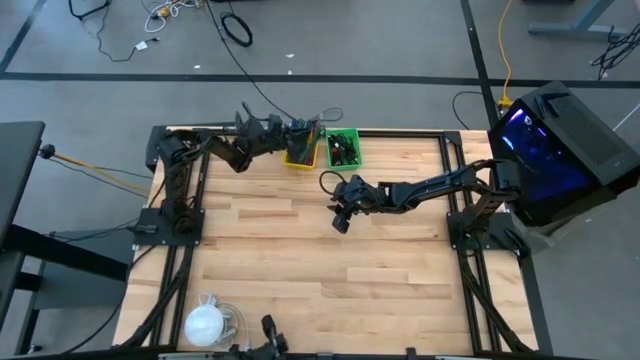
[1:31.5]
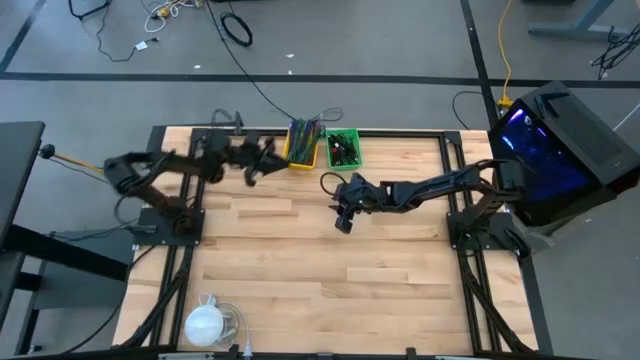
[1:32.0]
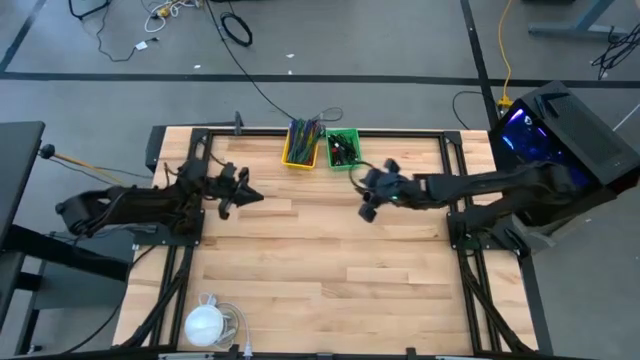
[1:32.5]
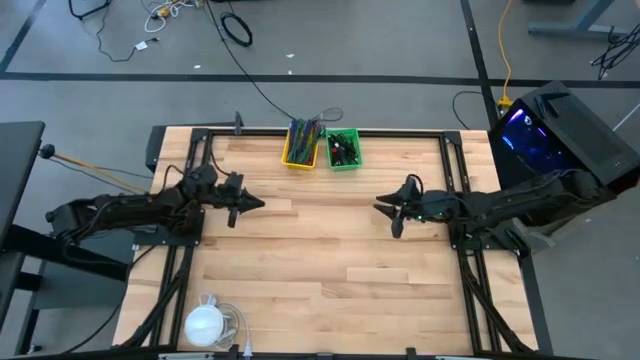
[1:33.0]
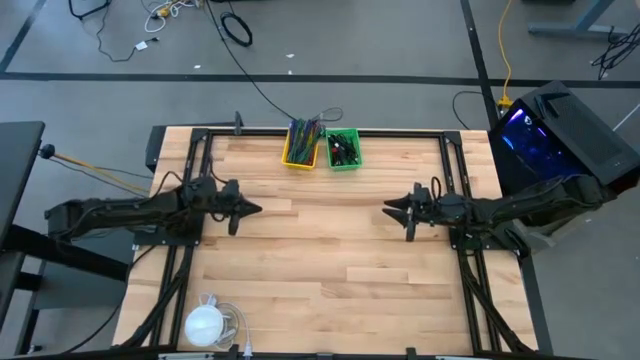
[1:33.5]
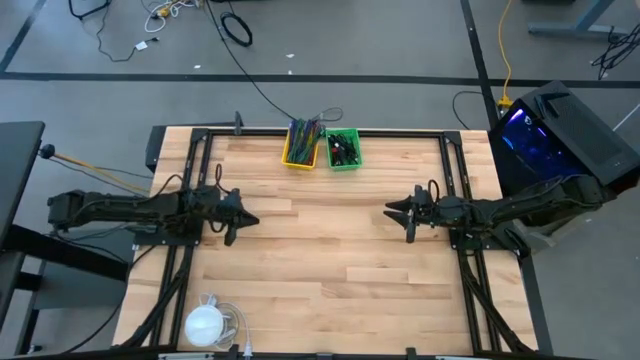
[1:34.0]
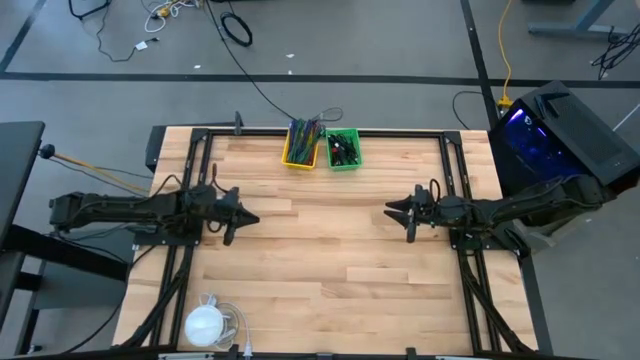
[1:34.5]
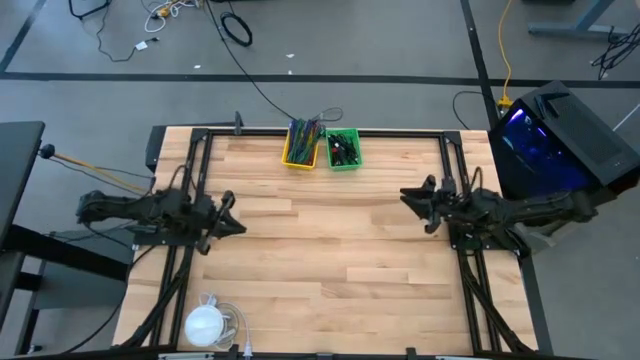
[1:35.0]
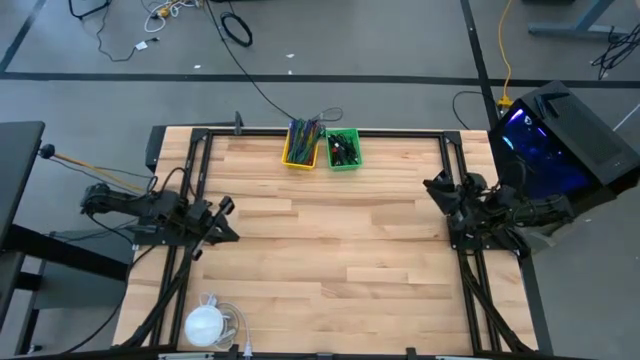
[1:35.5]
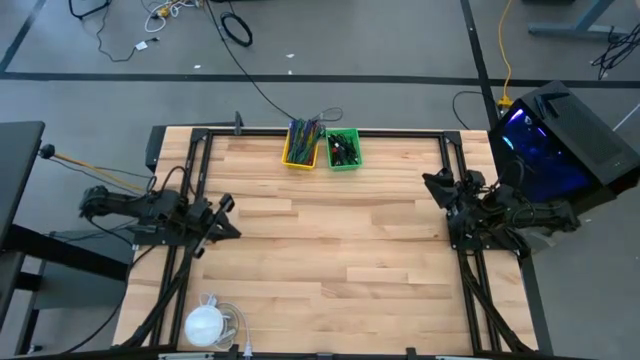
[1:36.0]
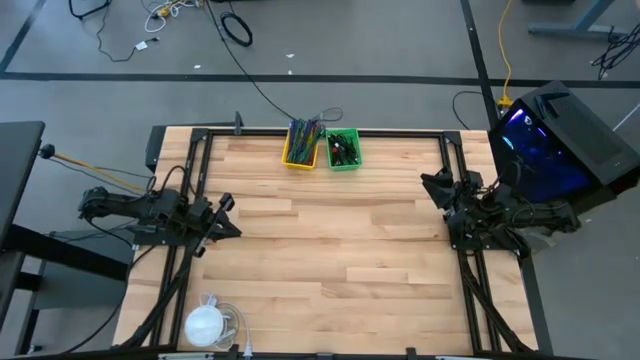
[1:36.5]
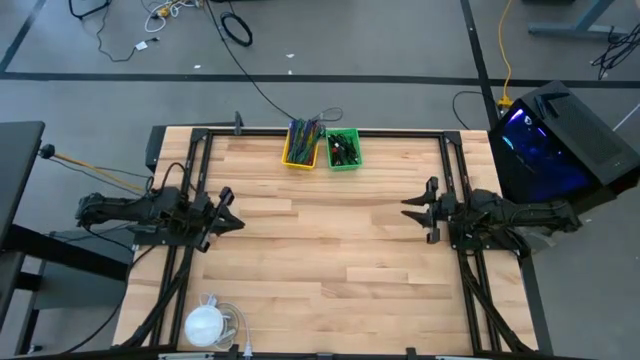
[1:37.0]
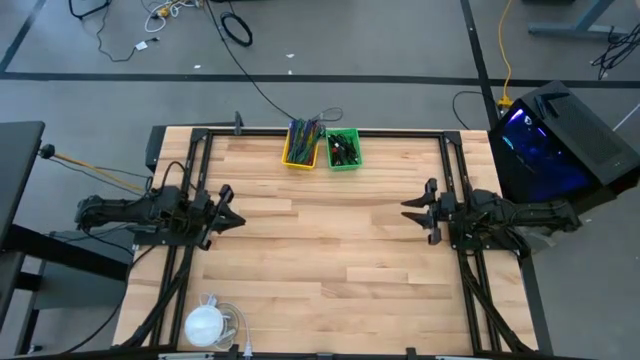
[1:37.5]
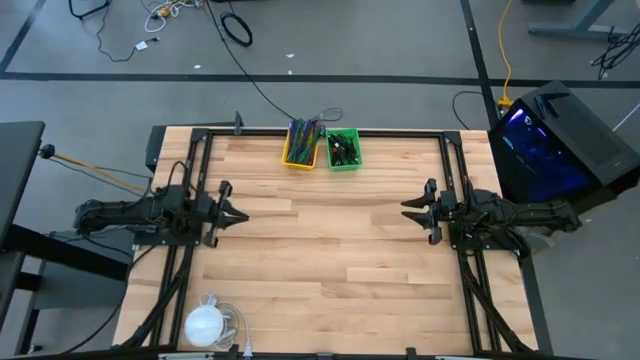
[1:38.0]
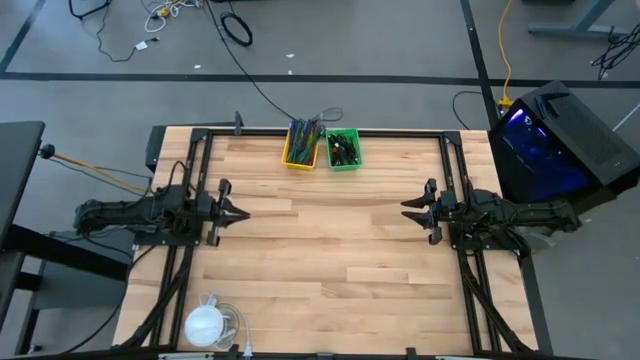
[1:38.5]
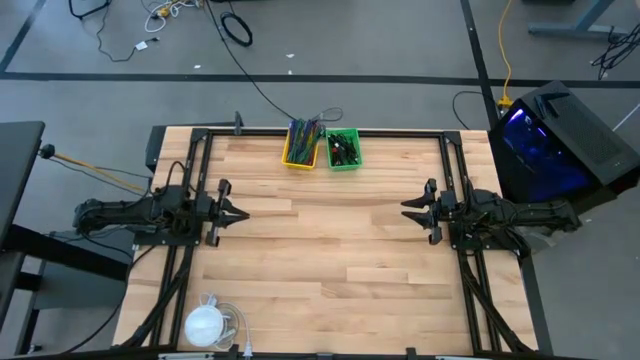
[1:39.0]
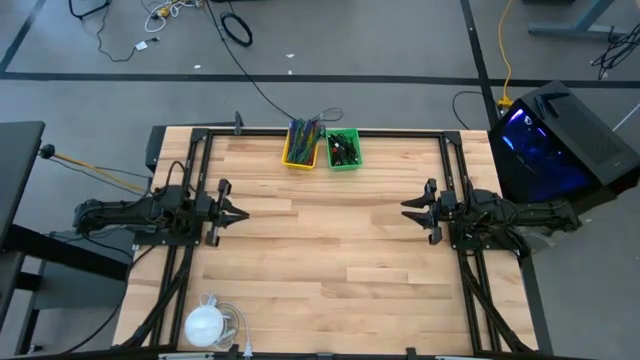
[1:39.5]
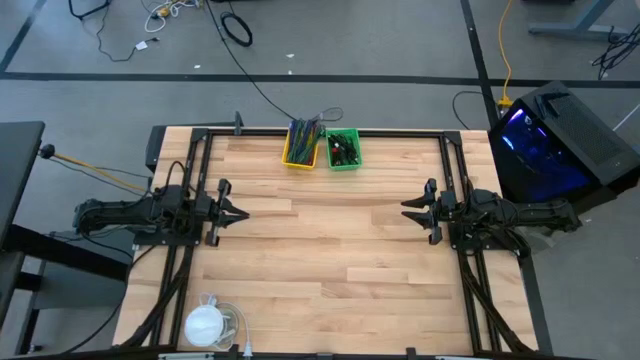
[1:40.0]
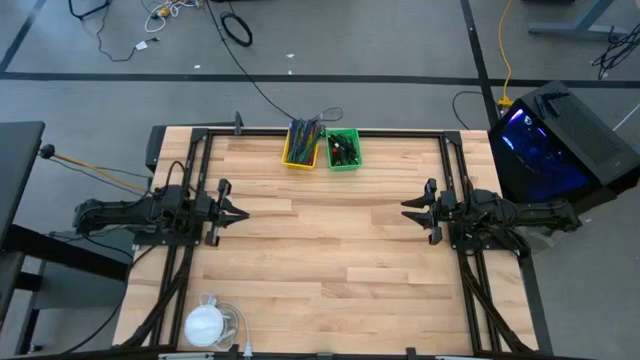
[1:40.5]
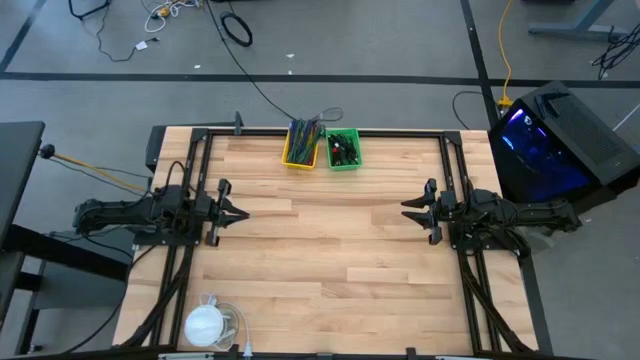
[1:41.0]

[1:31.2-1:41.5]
Task: Pick & Place USB Port
Return to Home Position

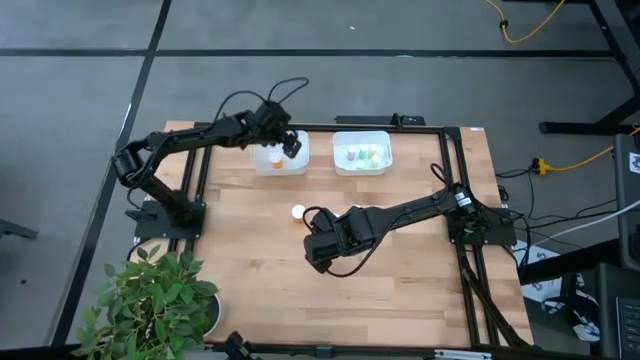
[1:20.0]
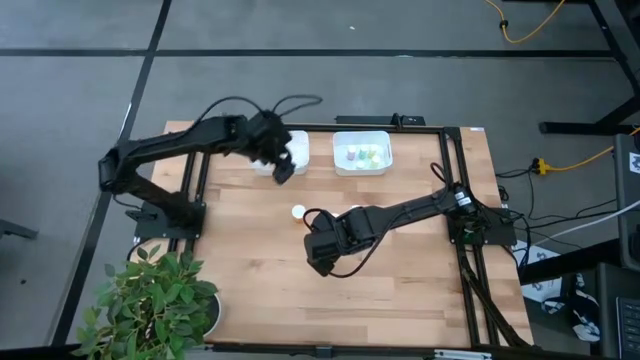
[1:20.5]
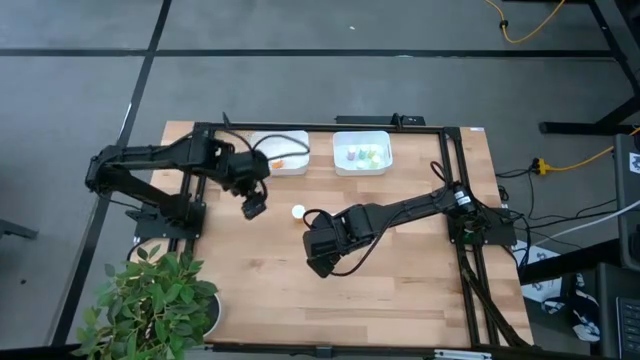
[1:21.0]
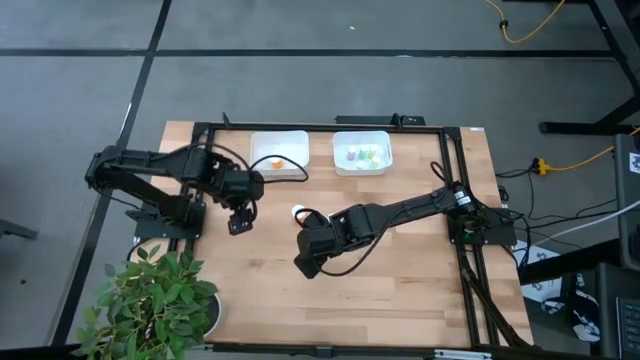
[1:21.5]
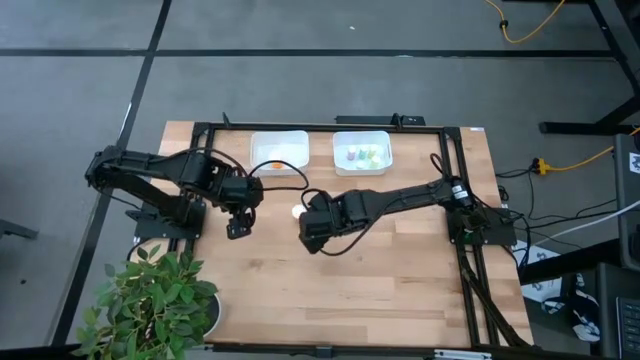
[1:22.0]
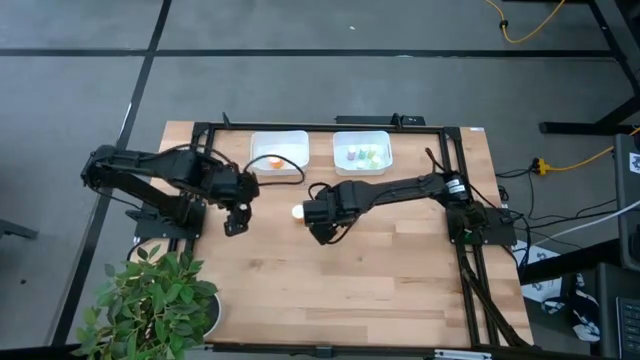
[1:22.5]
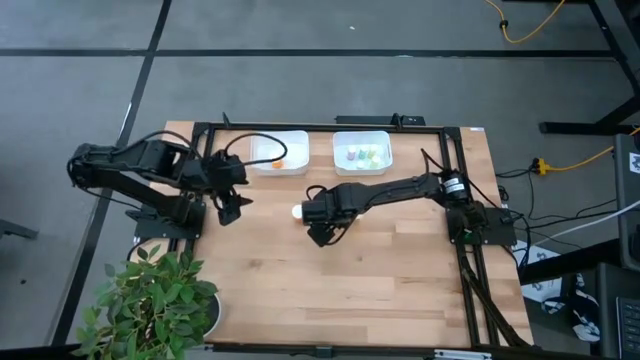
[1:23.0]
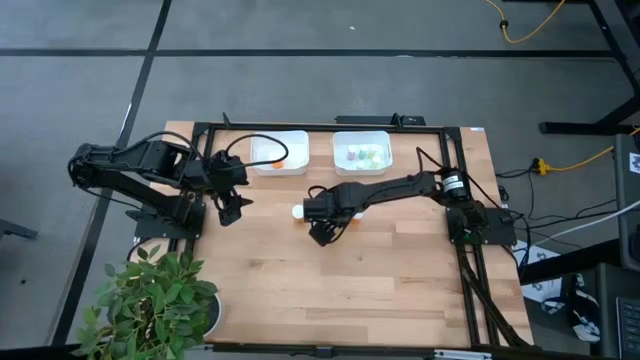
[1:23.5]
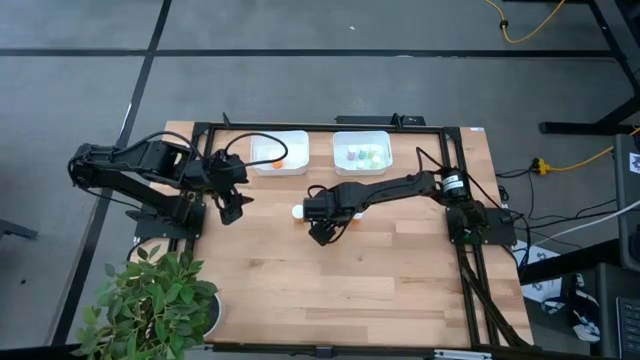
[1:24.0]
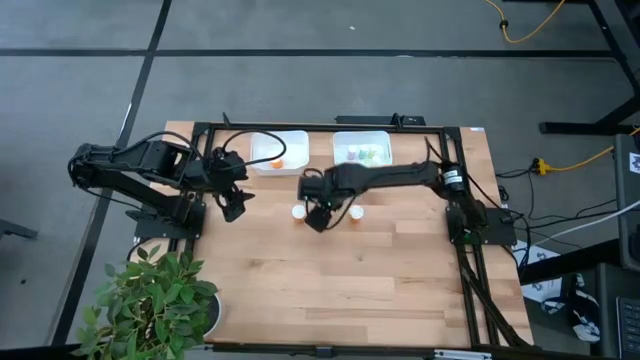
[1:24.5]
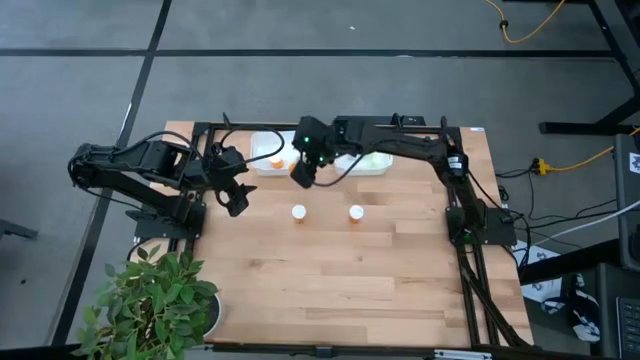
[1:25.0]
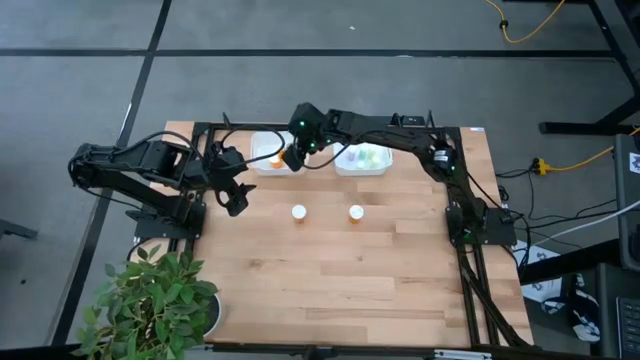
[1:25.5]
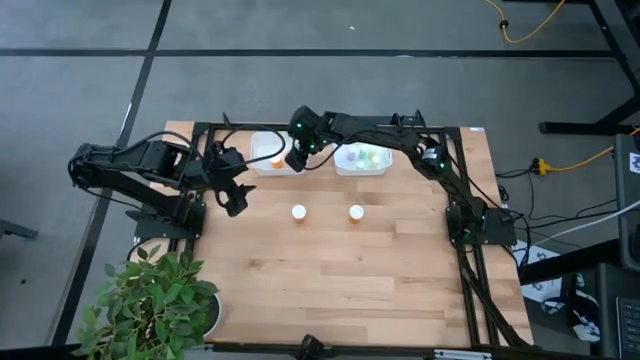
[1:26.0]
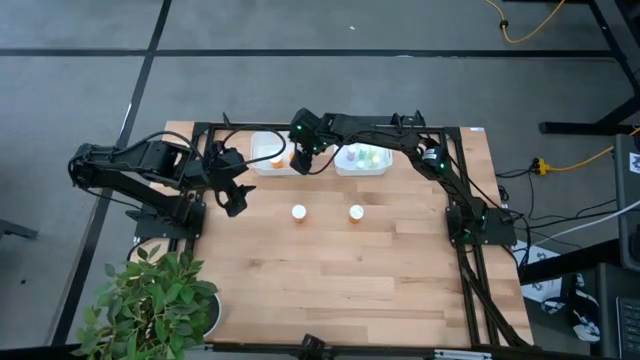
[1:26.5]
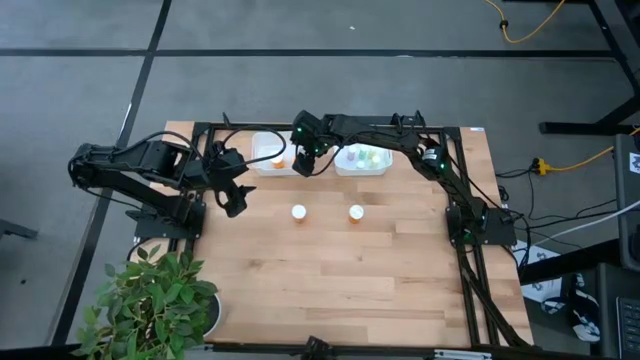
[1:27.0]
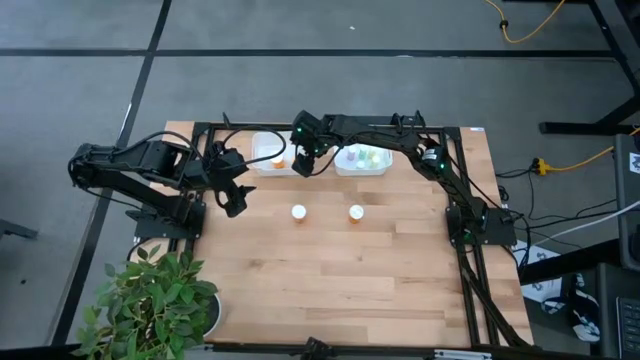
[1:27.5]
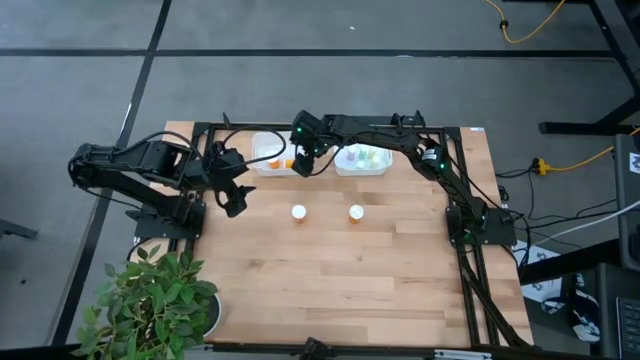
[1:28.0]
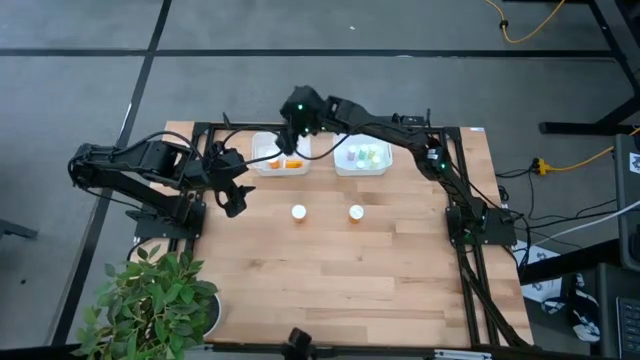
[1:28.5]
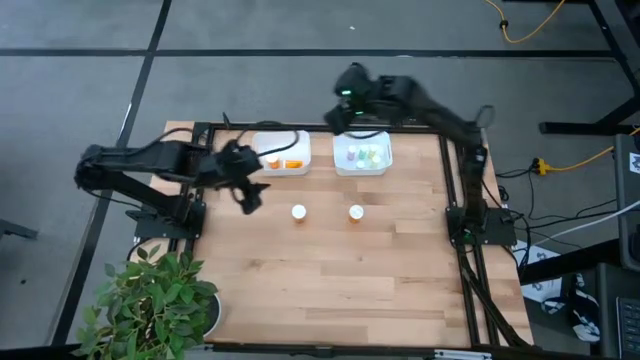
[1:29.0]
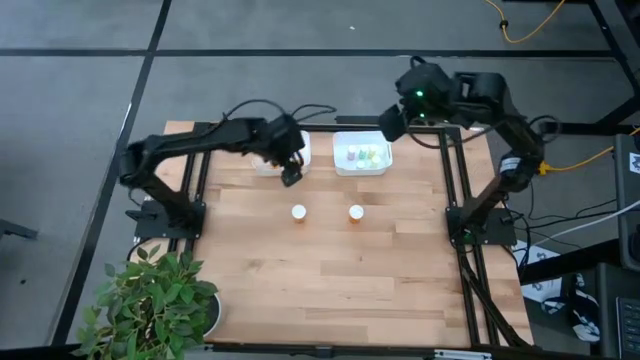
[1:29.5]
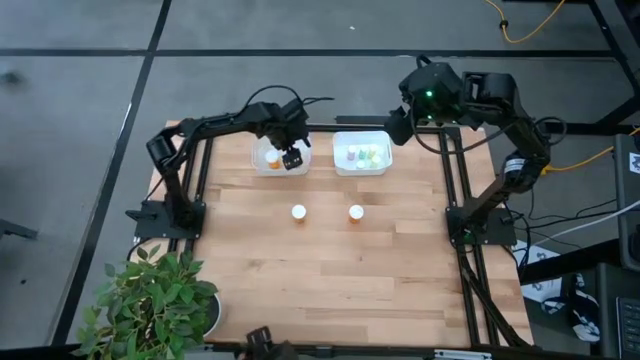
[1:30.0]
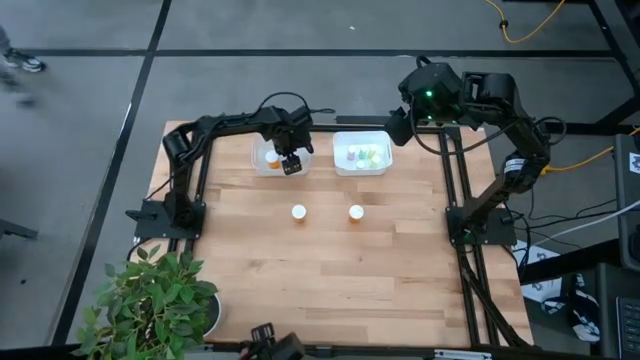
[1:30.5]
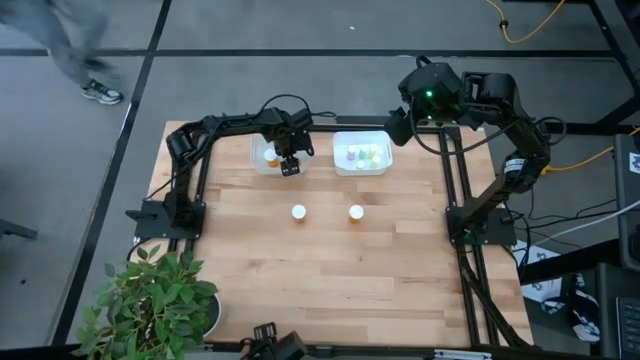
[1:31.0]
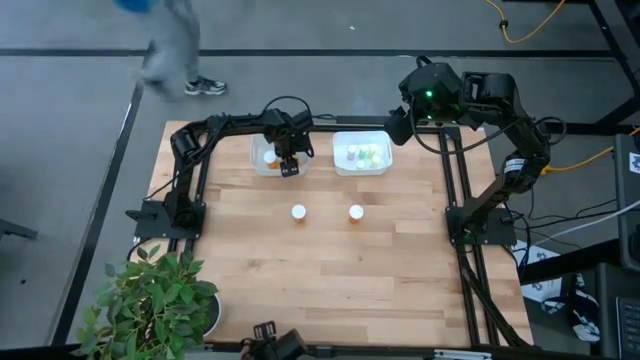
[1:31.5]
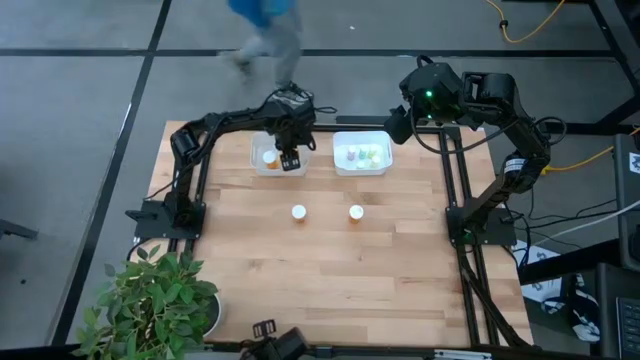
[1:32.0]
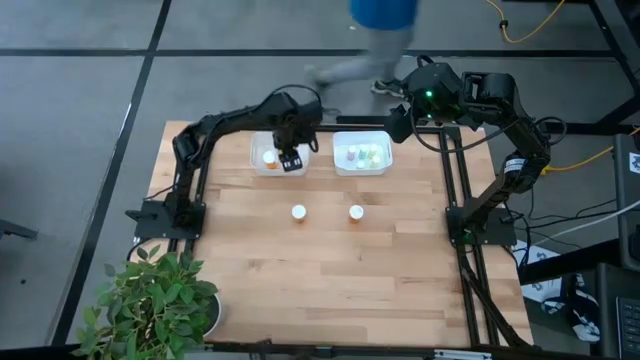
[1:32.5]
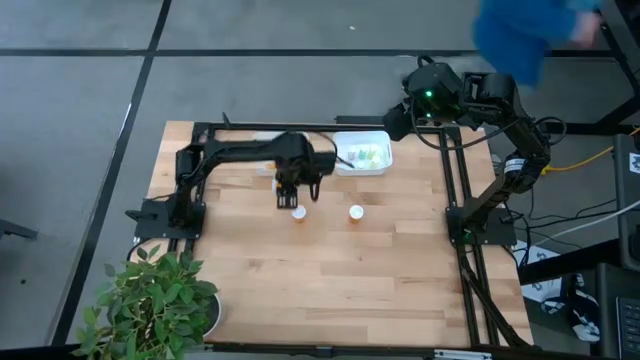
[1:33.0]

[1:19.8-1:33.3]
Task: Pick and place medicine bottles into bin by pill shape (circle, oval)
Put the orange pill bottle into the left white bin
